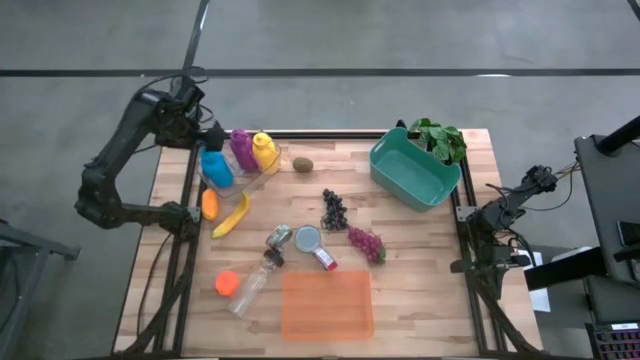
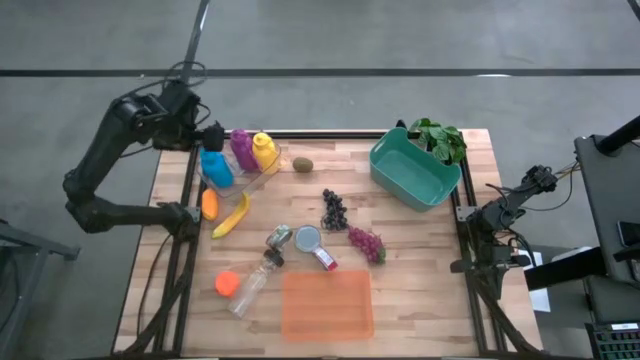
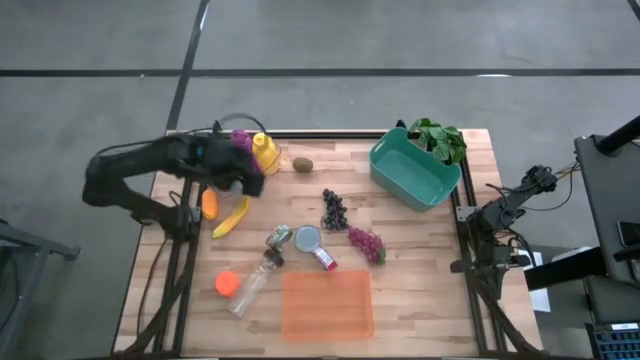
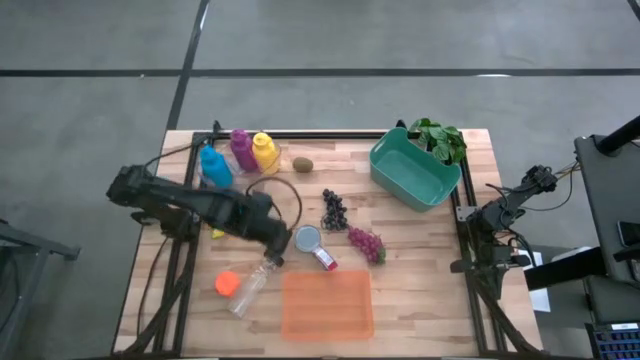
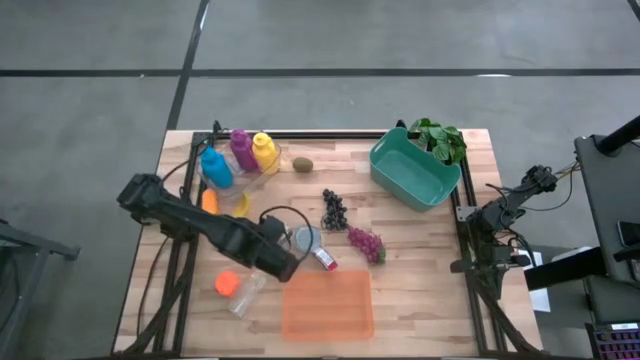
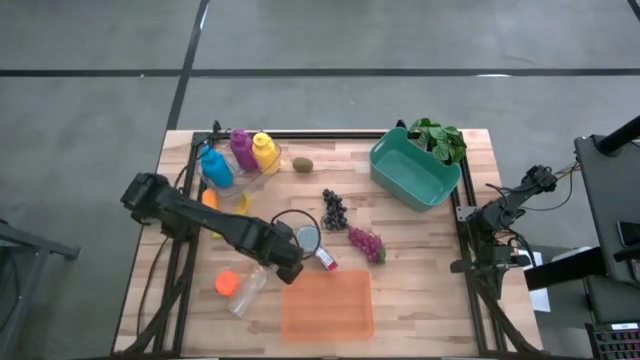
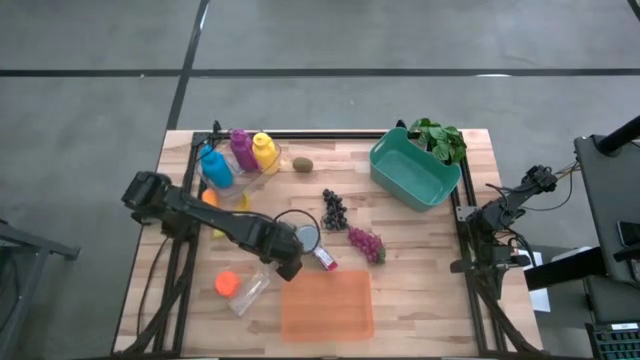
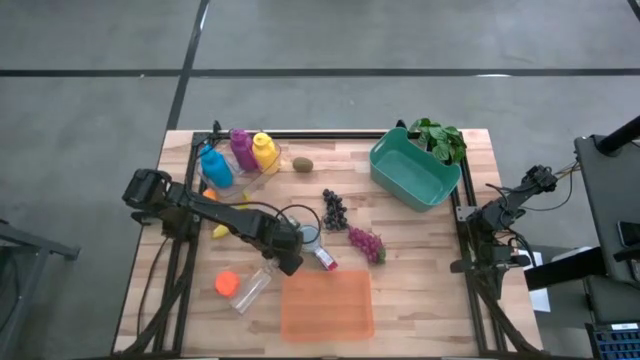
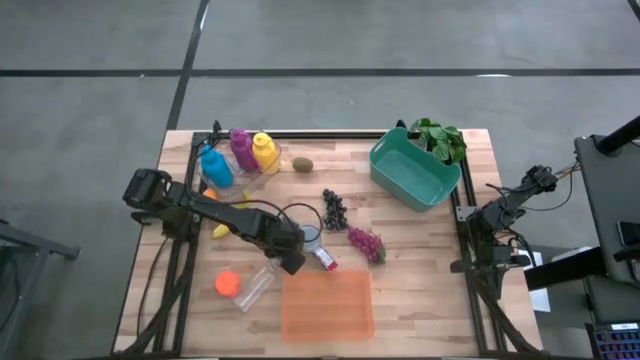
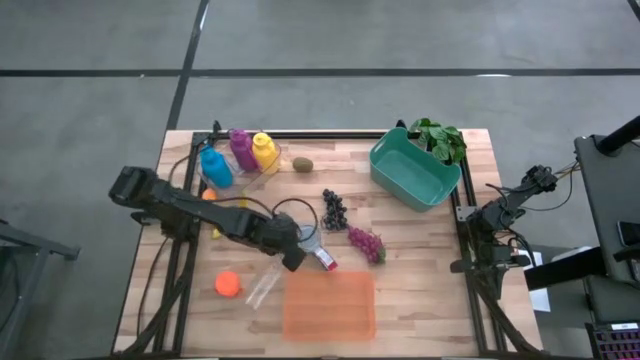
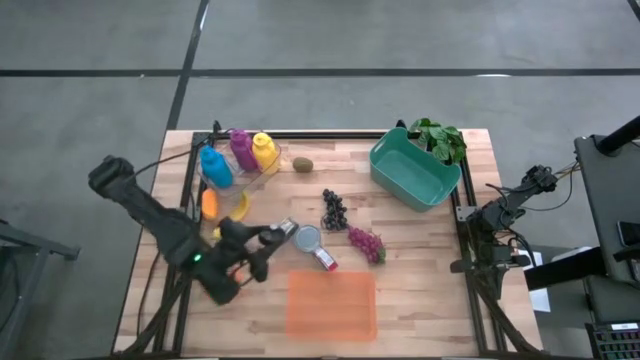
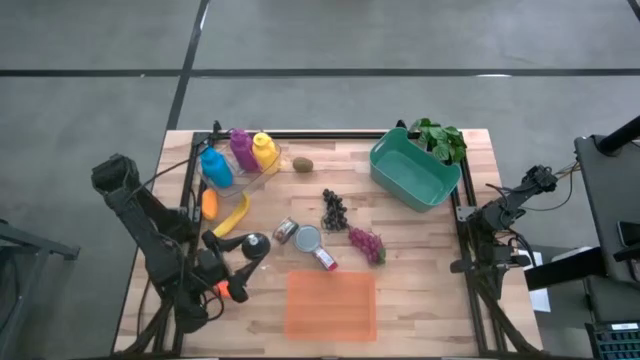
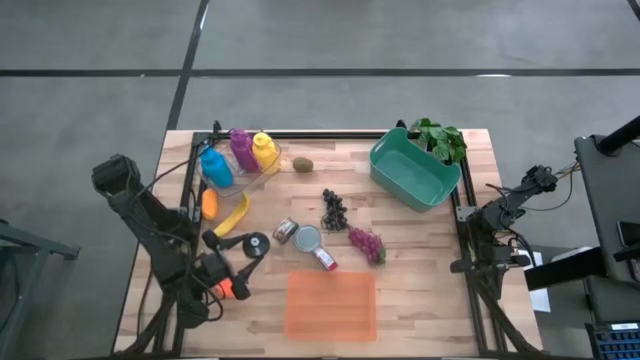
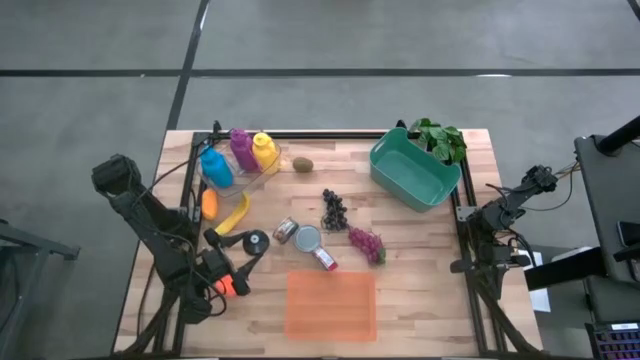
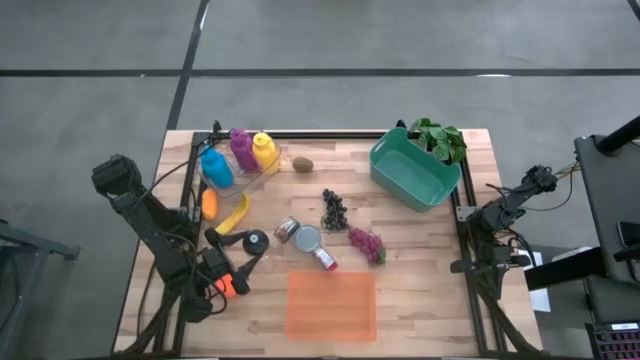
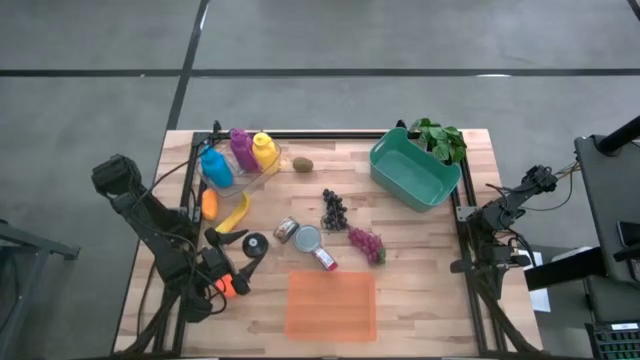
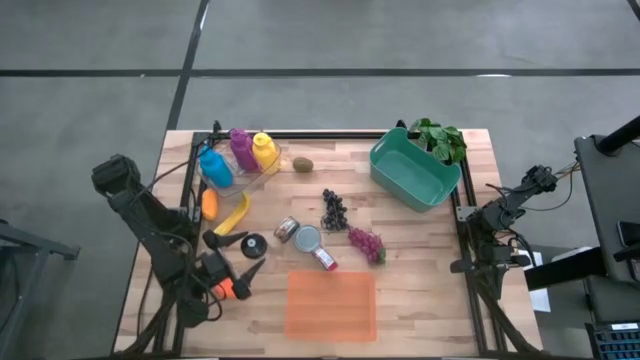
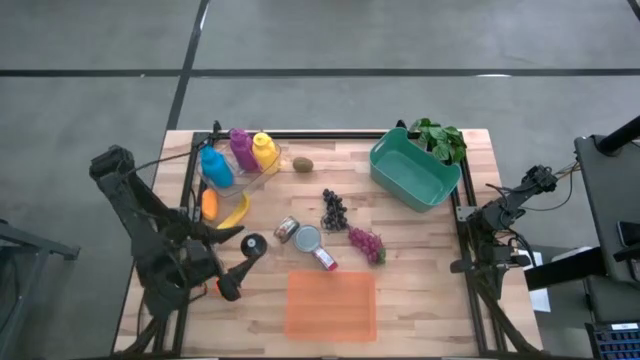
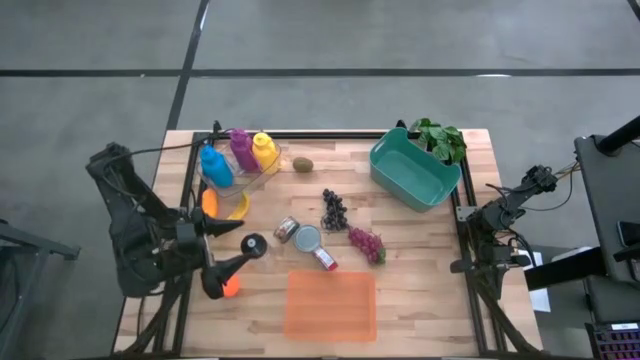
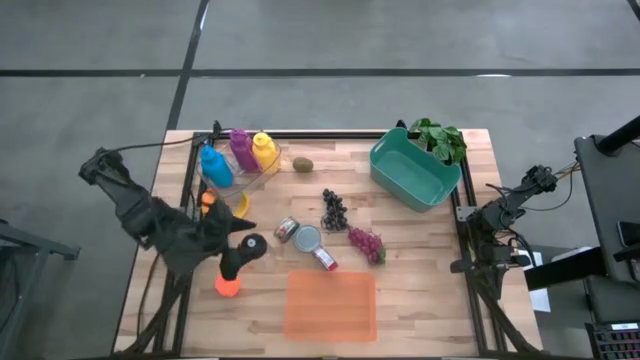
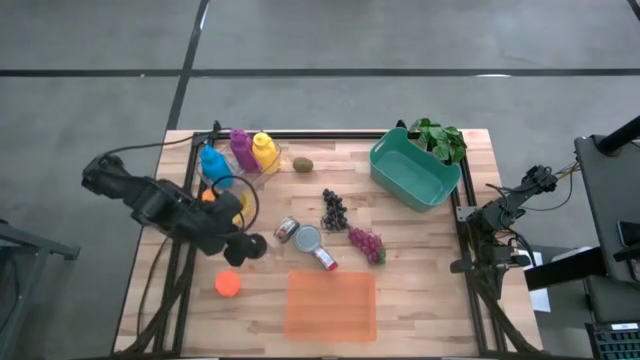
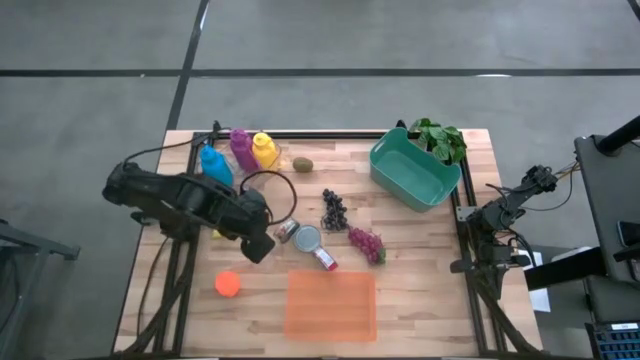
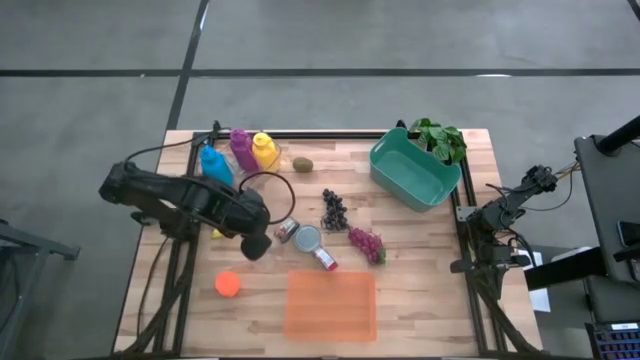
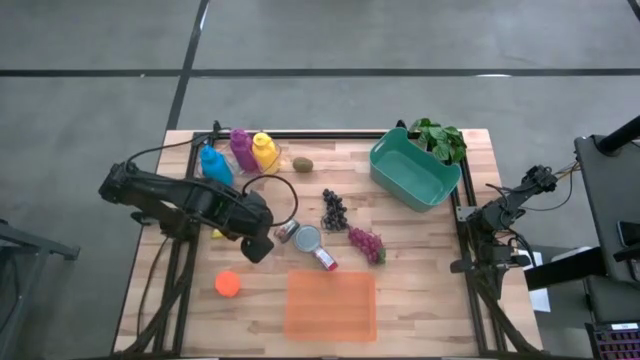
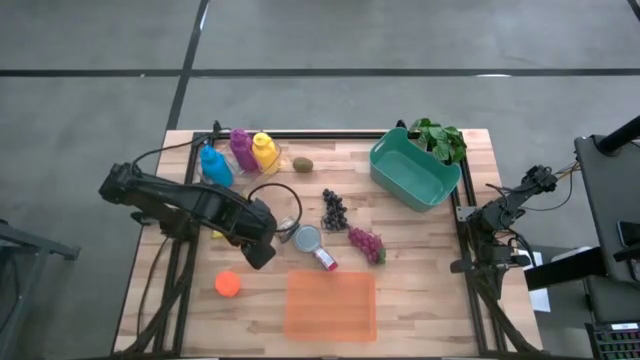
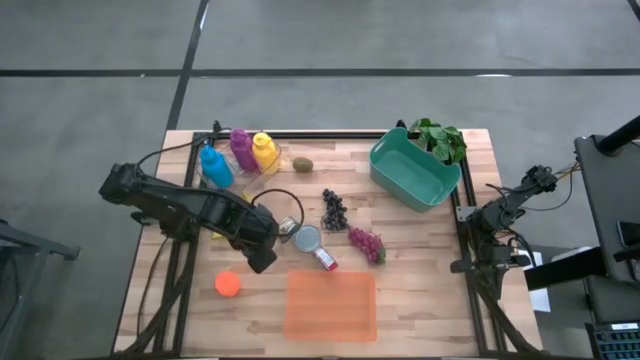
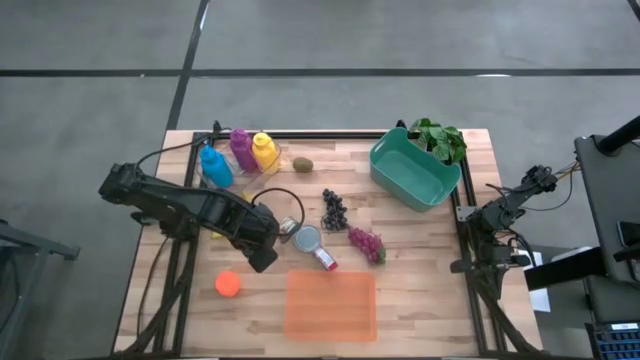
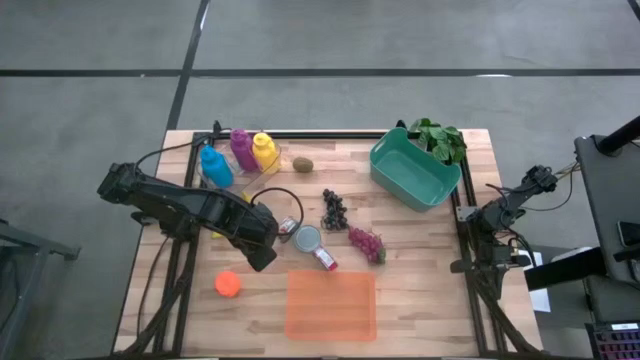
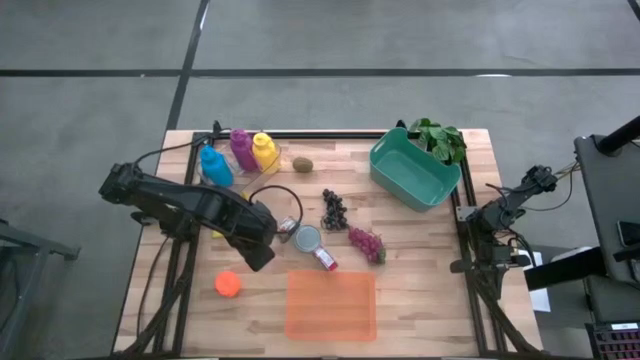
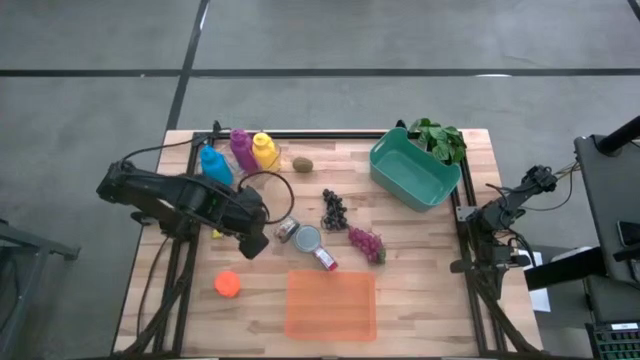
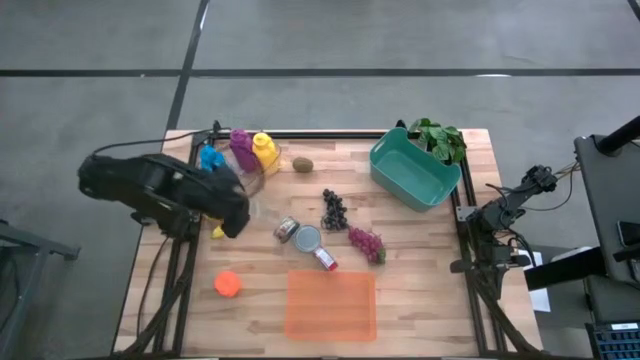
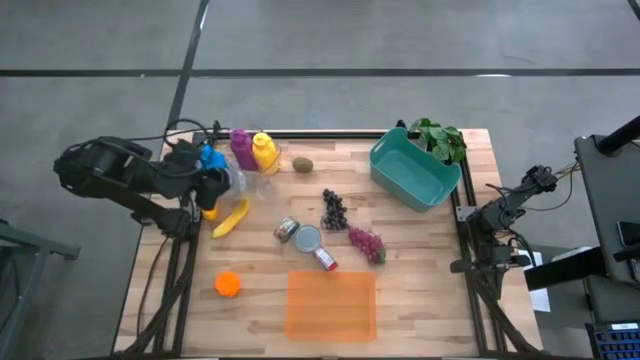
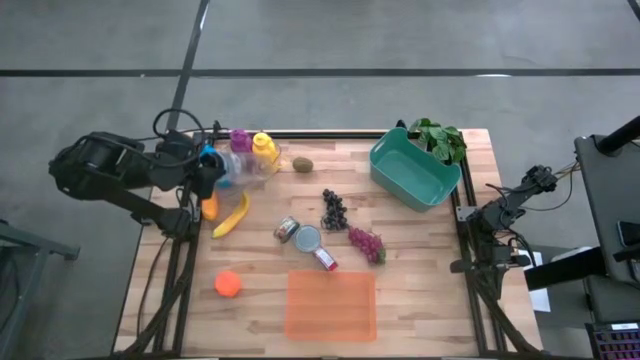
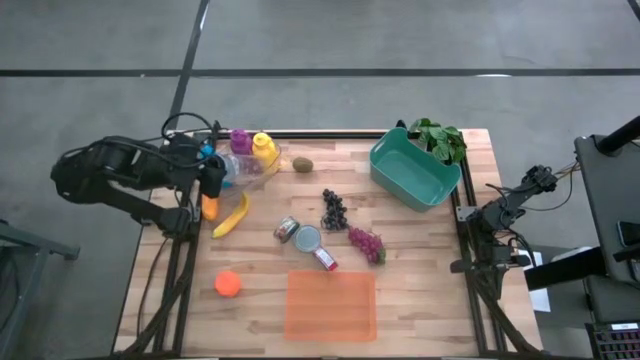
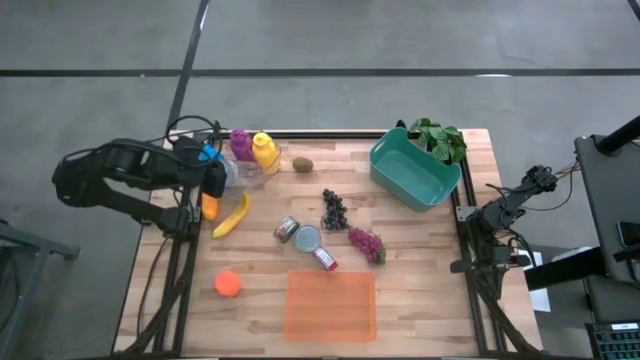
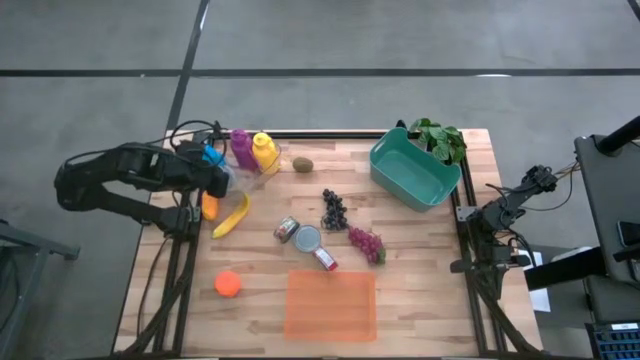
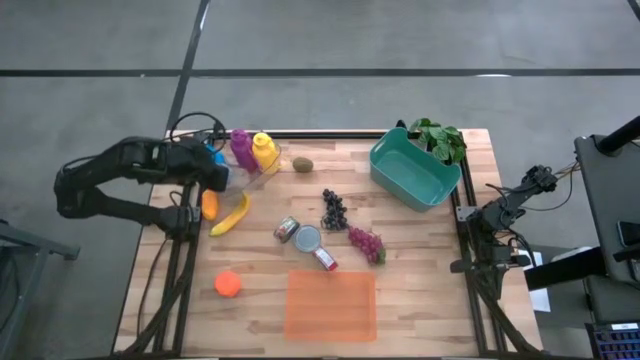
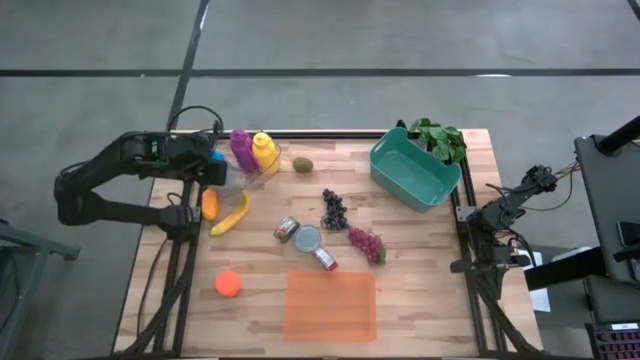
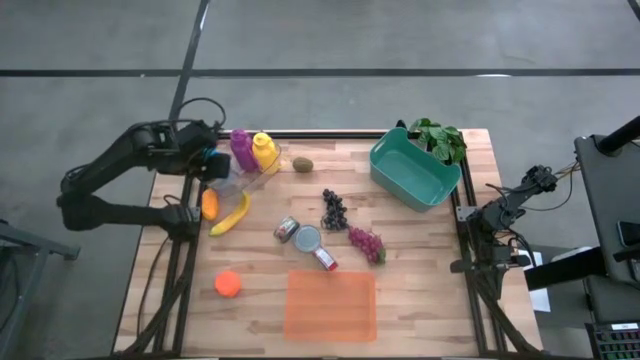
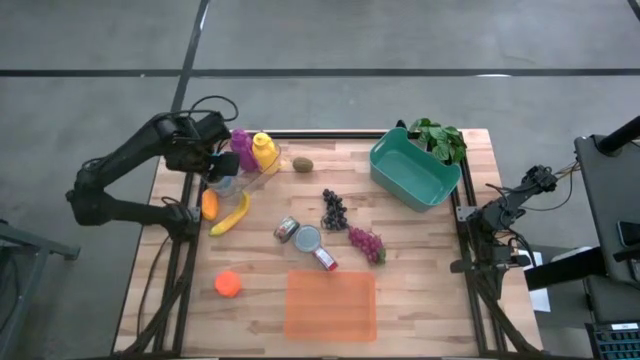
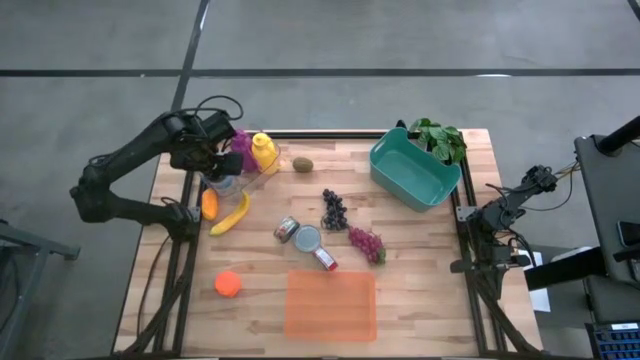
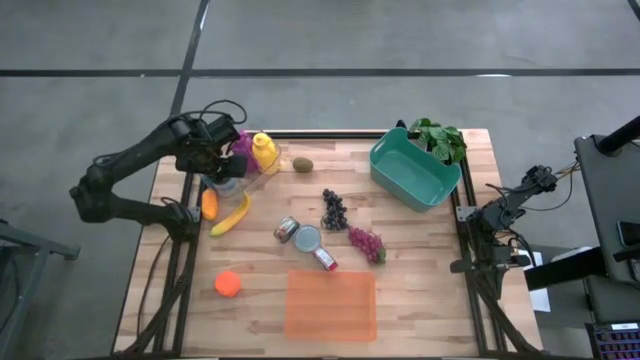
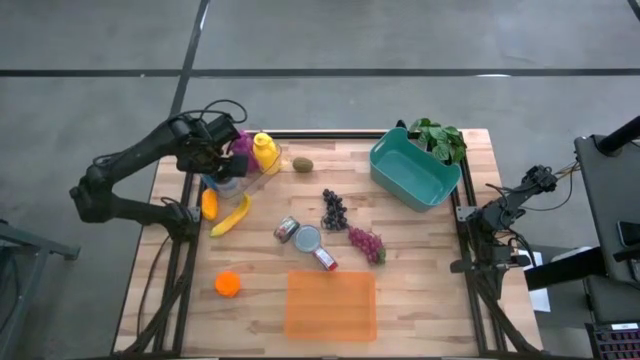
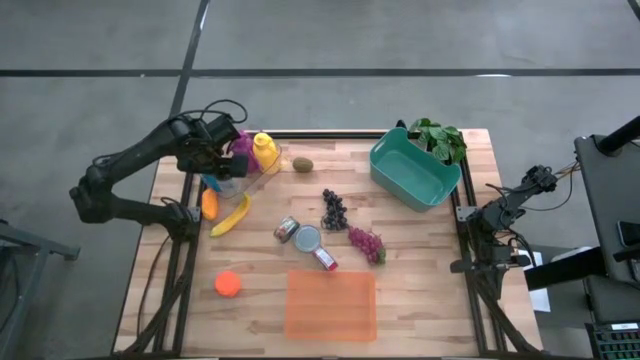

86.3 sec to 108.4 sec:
Task: Pick & Place Food Item
Put the transparent water bottle into the transparent bin
